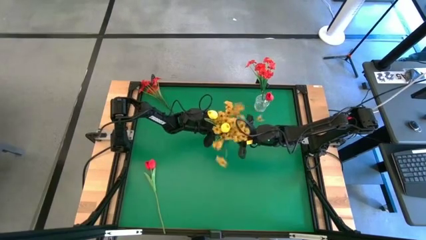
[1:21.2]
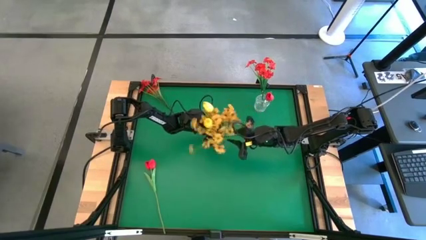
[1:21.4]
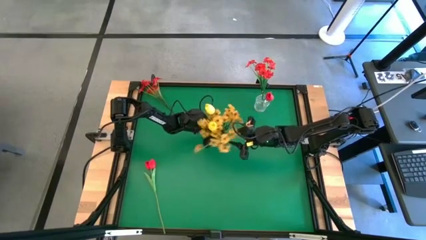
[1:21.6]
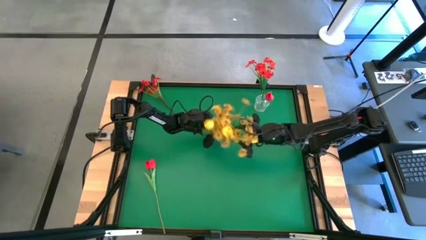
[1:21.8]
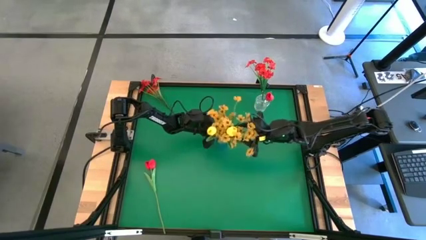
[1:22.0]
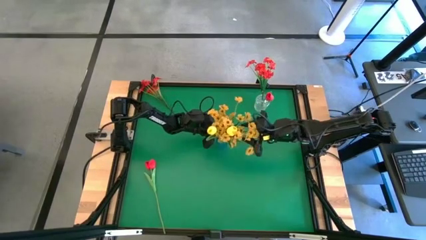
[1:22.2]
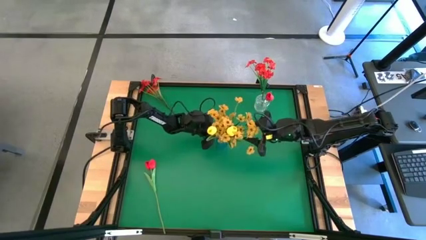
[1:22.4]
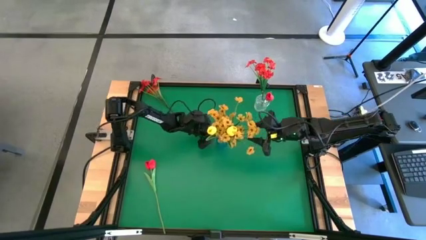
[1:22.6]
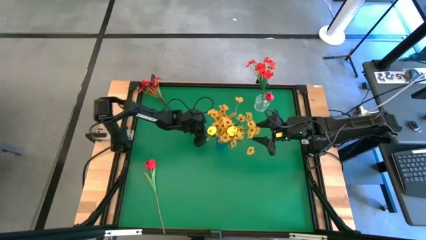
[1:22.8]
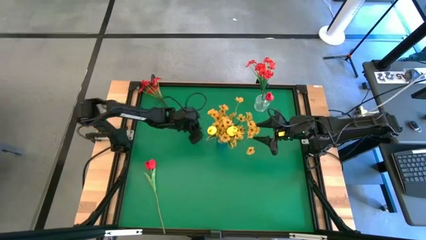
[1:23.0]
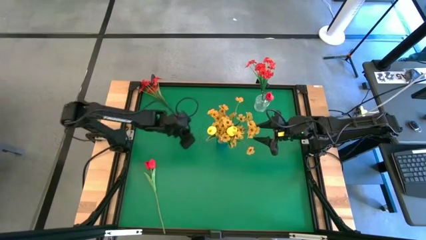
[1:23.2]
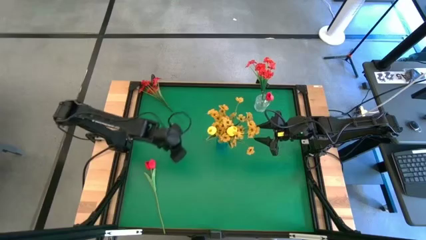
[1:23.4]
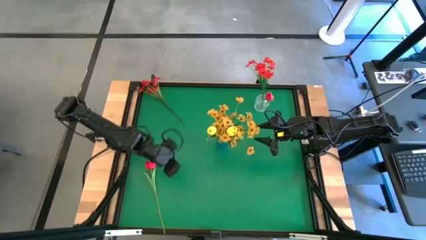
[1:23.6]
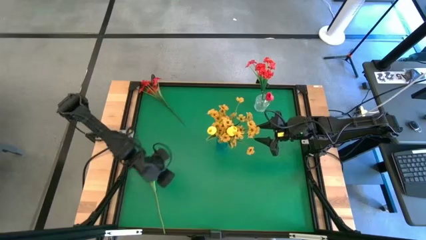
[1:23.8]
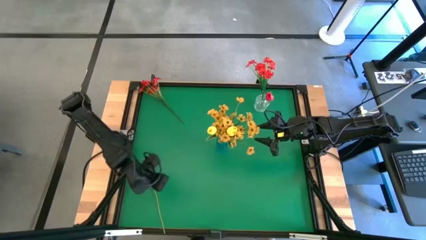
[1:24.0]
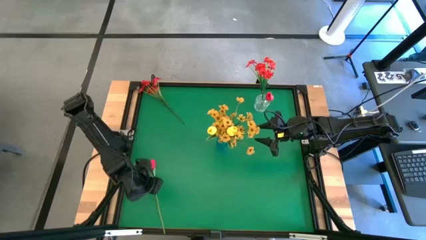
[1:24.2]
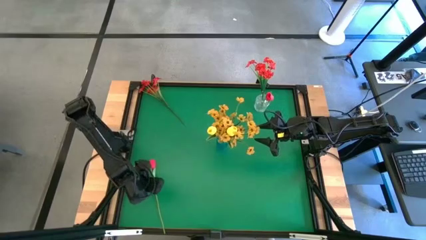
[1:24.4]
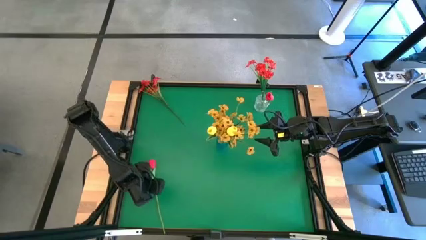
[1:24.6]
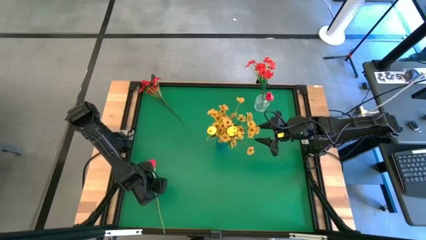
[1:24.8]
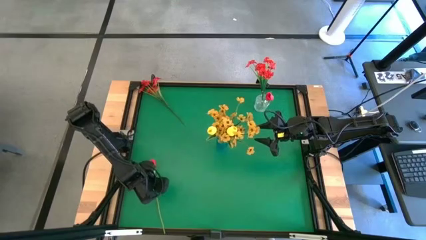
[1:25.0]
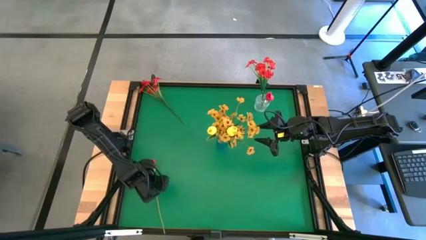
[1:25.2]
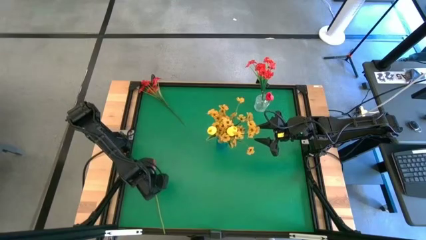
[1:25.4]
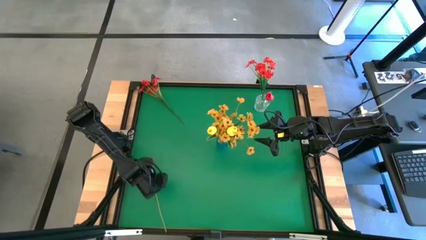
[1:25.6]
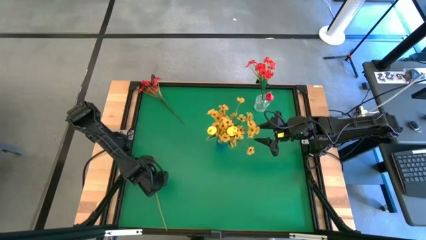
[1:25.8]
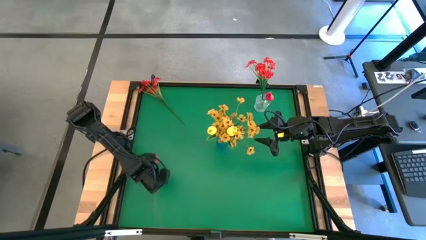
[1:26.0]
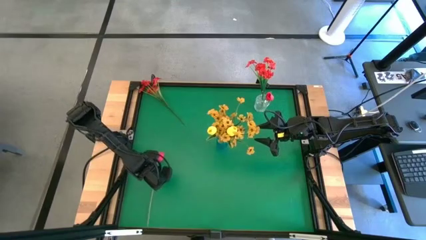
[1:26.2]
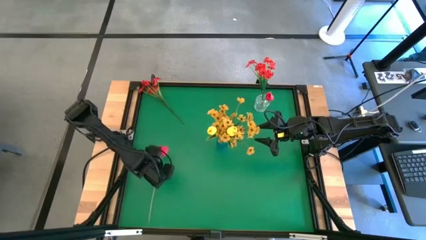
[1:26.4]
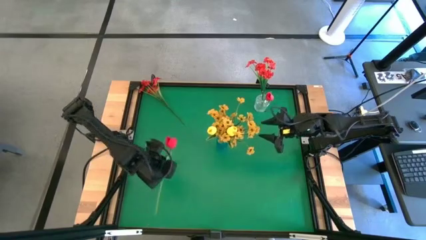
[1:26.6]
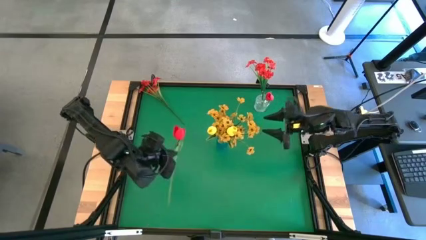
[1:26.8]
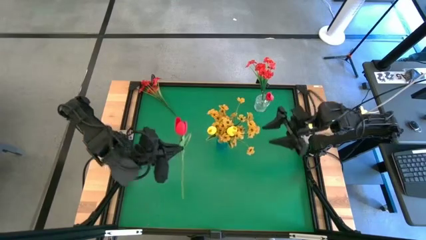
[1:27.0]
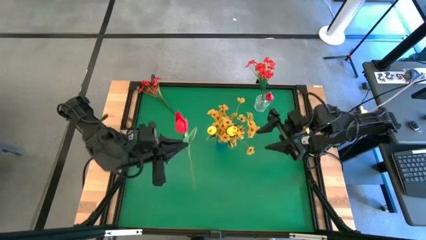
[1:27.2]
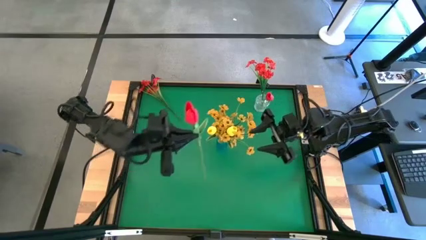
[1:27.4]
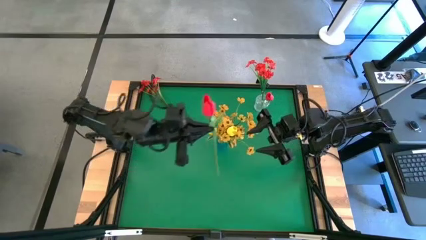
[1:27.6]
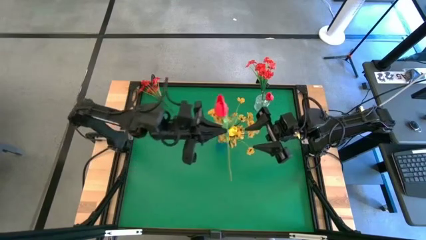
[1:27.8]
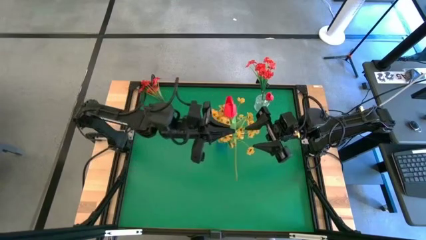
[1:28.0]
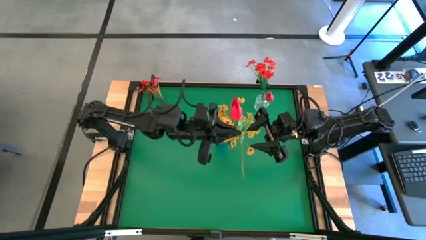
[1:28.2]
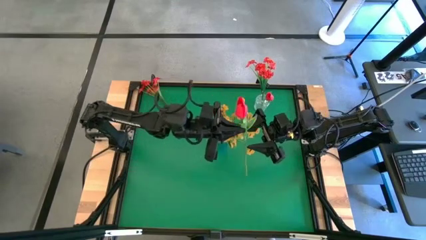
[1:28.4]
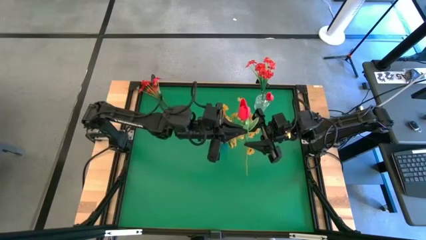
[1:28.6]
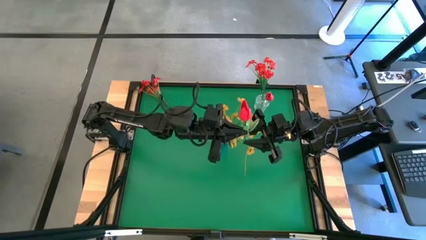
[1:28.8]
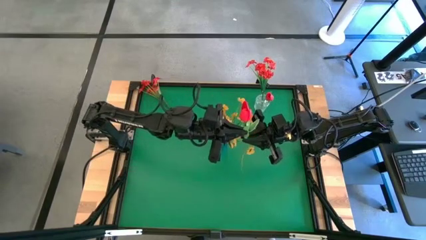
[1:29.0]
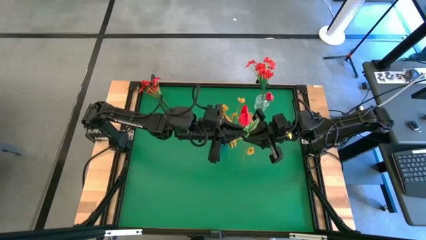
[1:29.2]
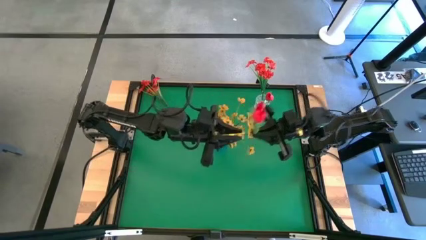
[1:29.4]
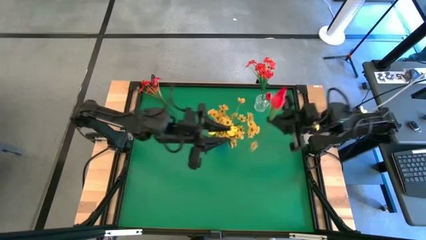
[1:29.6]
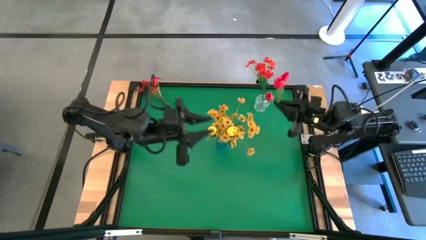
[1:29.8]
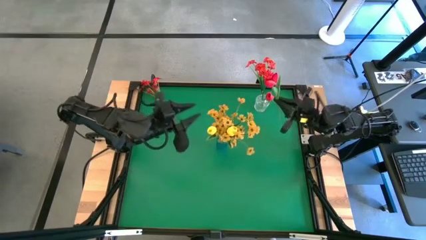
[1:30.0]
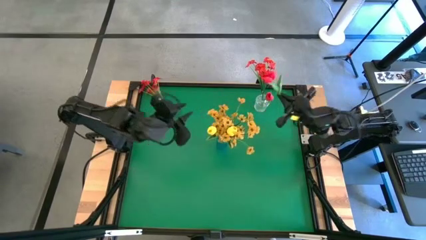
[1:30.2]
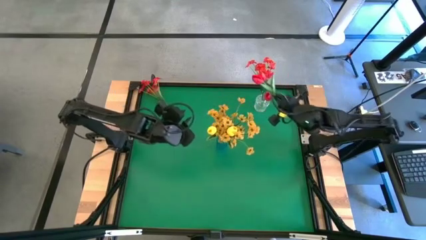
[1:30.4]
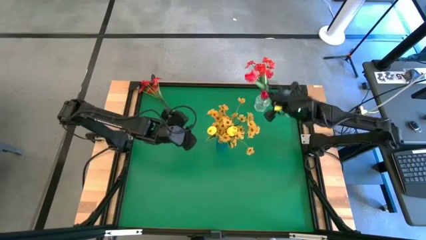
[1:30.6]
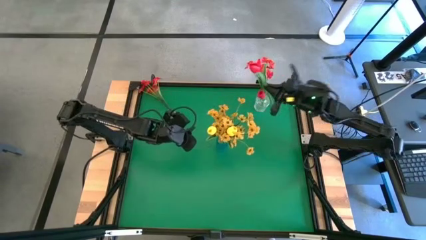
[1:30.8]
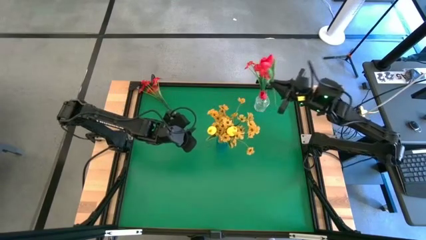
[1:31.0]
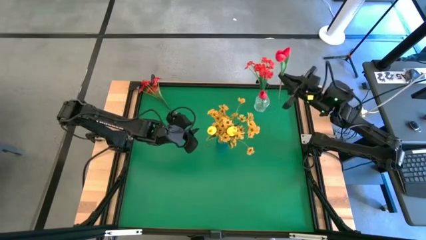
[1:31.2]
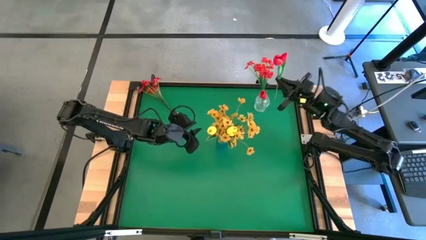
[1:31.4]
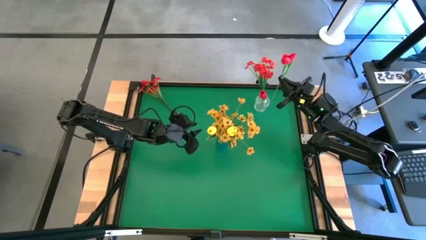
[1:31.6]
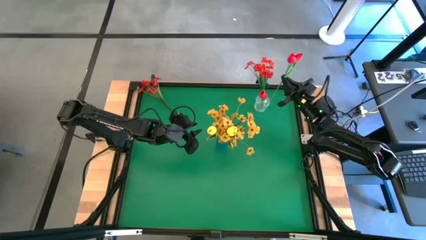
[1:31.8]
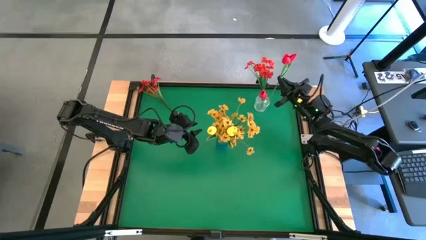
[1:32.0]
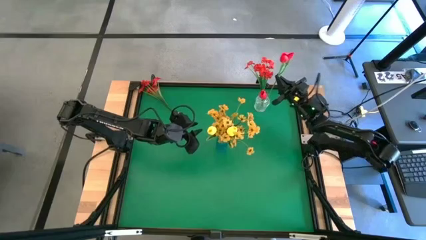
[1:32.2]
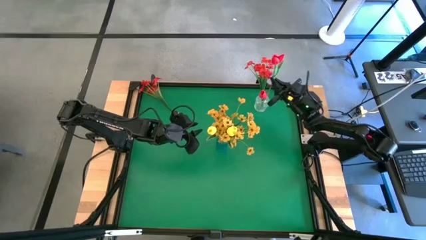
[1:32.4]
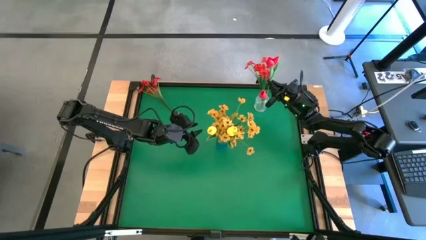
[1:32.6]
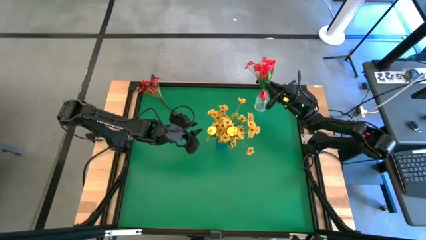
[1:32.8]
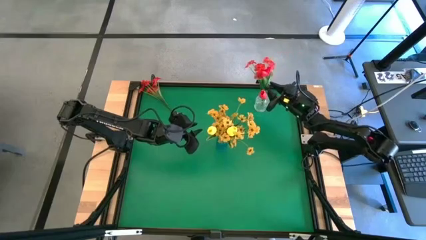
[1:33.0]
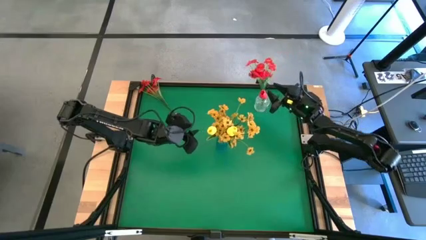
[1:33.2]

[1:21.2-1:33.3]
Task: Sort flowers into vase by color
Put the red flower into the transparent crystal vase

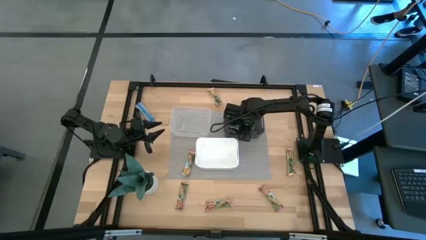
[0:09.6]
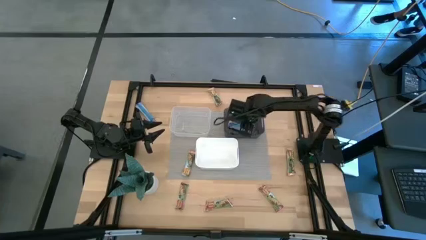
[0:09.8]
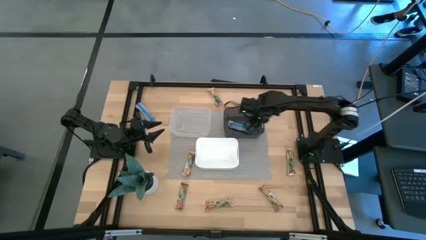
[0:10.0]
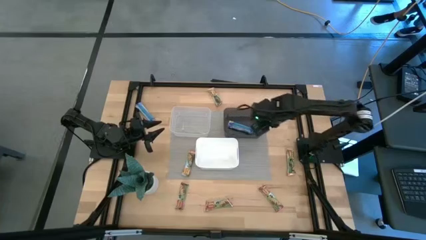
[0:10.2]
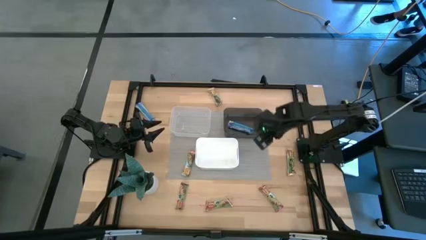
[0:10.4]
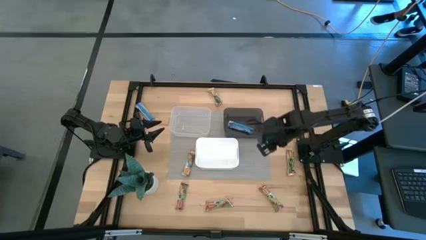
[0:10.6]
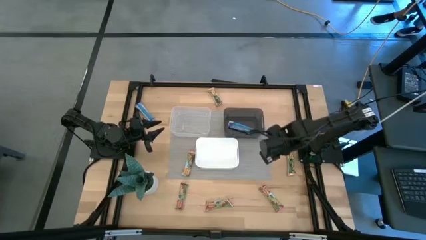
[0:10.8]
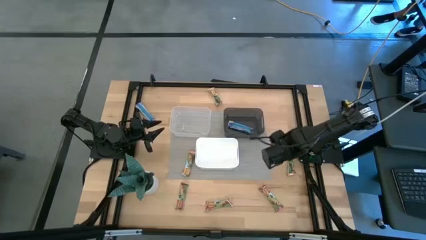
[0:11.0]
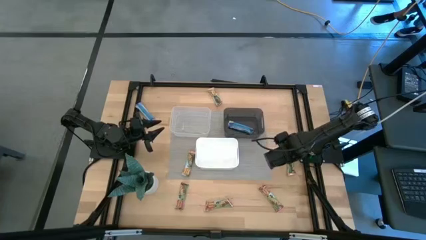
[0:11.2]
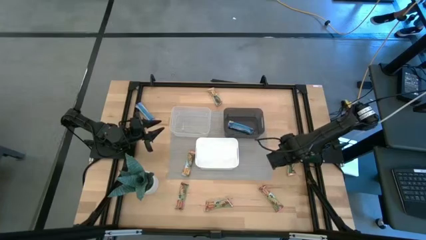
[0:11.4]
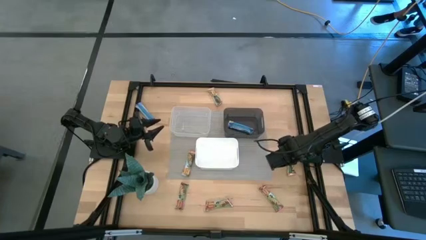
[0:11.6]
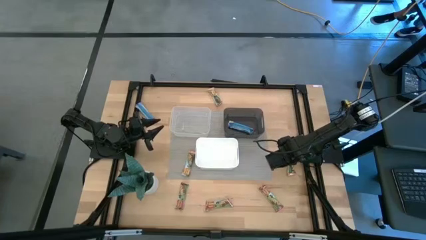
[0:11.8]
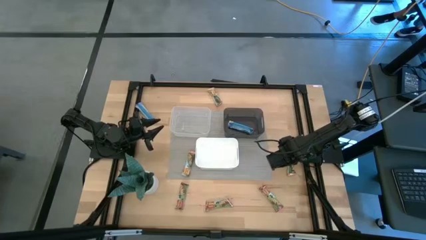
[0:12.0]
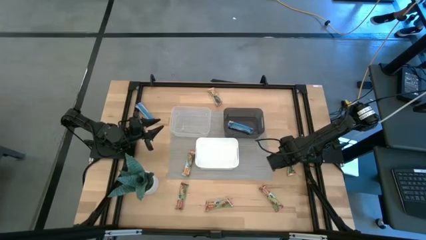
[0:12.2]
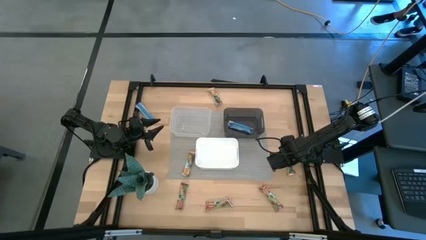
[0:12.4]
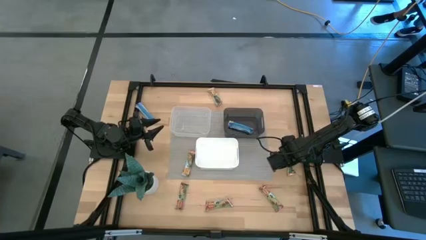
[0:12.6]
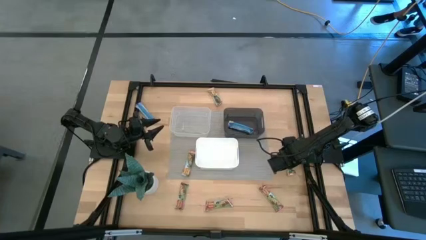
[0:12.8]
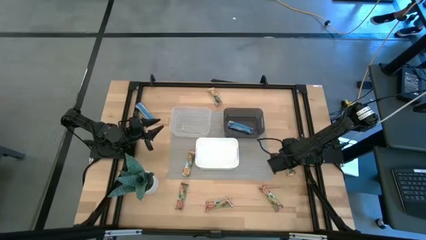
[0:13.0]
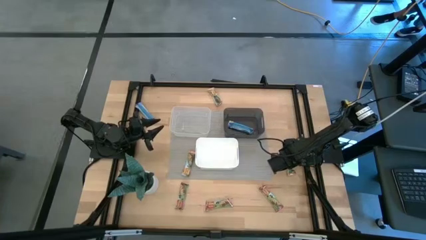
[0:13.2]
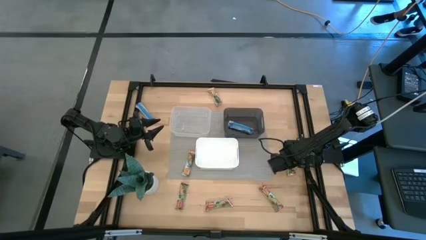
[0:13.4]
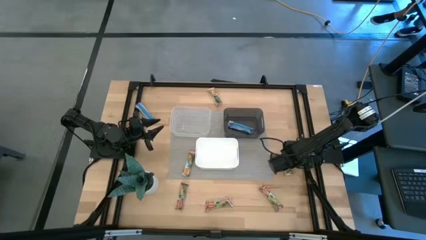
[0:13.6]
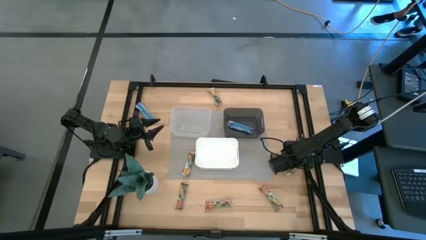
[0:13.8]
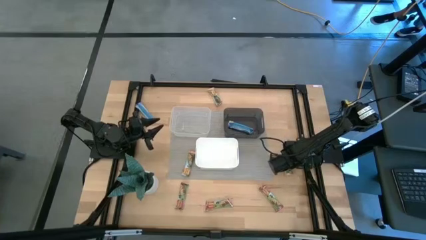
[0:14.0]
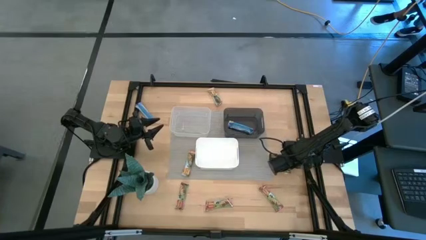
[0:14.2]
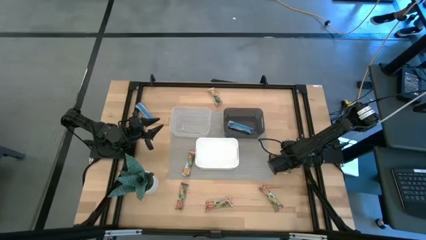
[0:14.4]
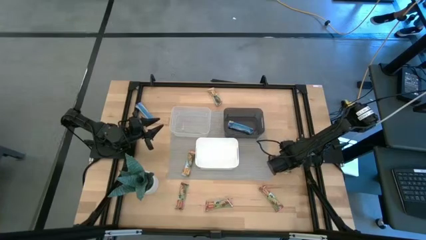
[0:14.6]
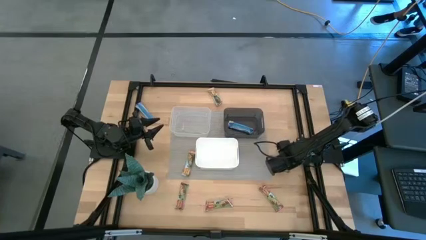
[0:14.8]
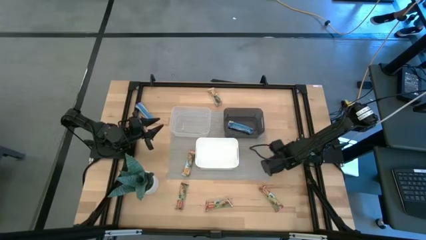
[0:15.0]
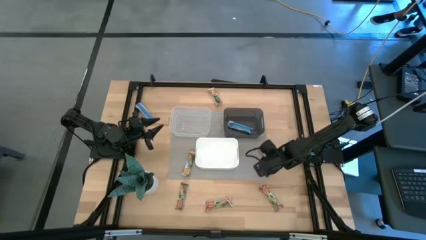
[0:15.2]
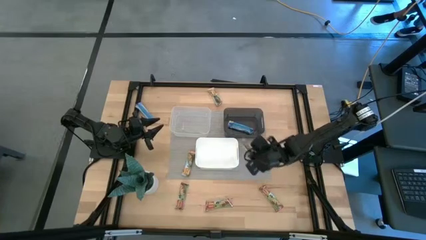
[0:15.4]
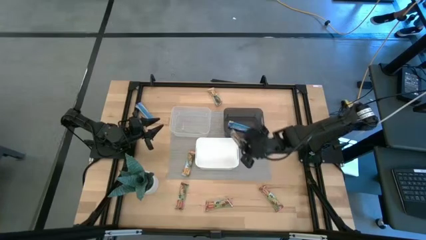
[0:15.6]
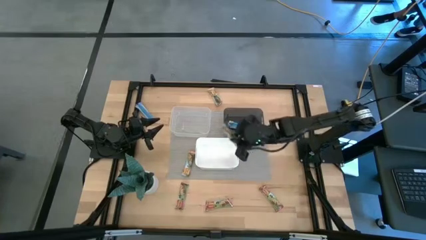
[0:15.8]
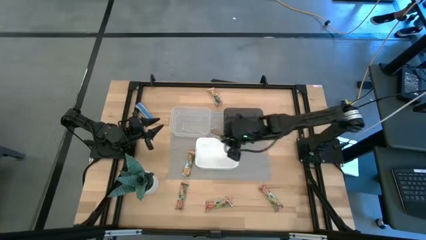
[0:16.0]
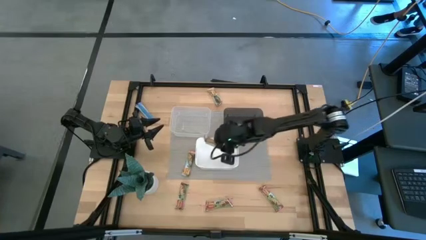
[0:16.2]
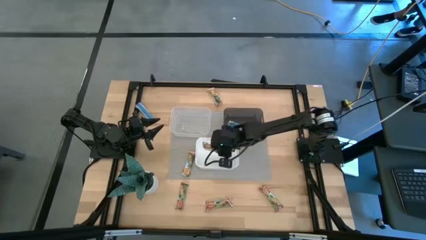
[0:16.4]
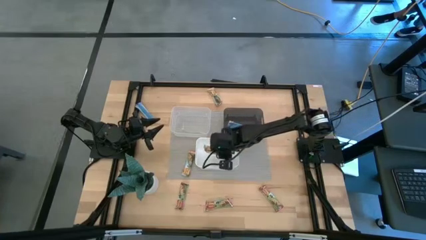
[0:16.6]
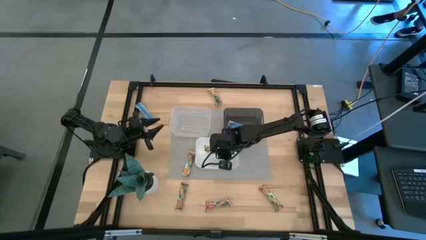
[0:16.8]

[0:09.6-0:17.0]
Task: Pick and place Granola Bars by type
Put the right yellow granola bar into the white bin
